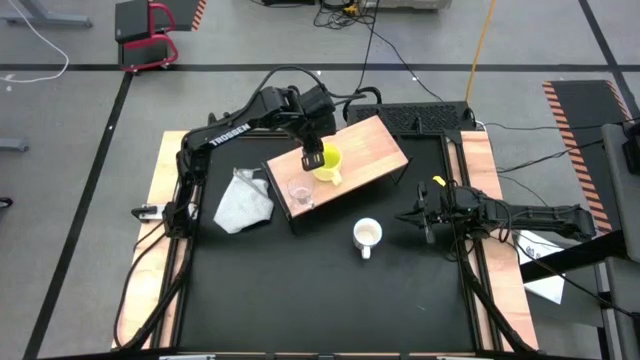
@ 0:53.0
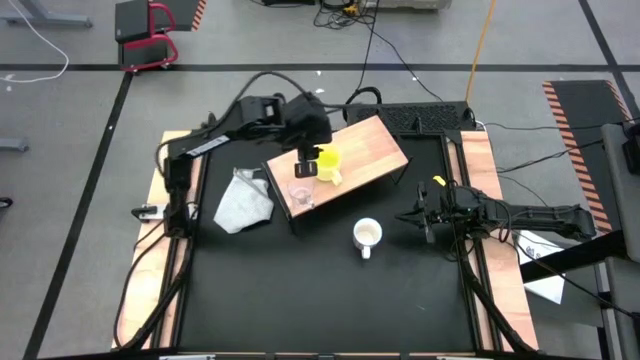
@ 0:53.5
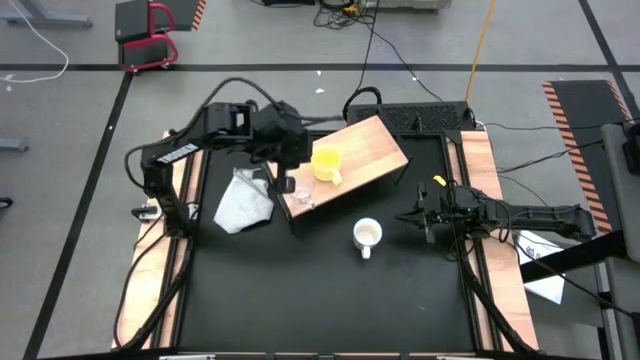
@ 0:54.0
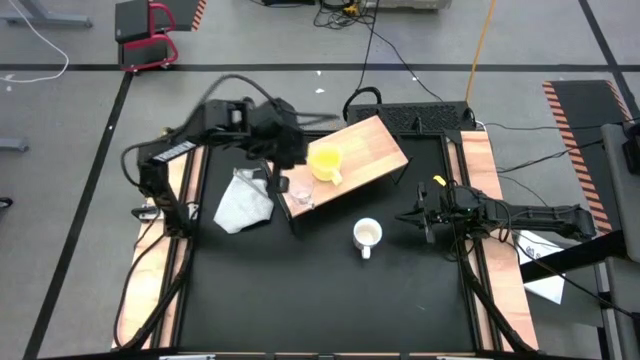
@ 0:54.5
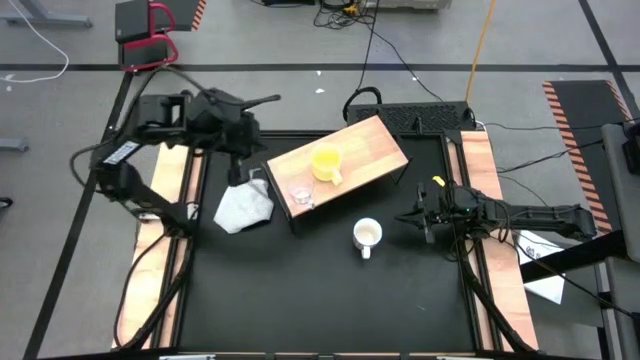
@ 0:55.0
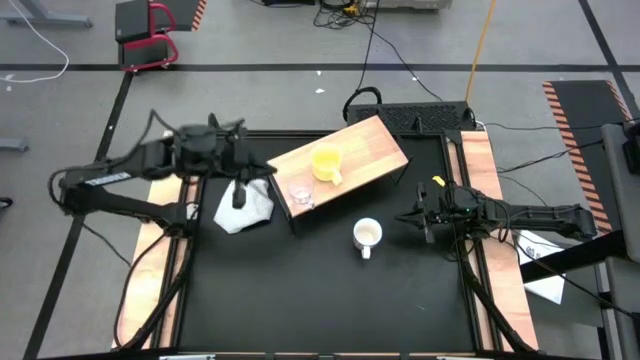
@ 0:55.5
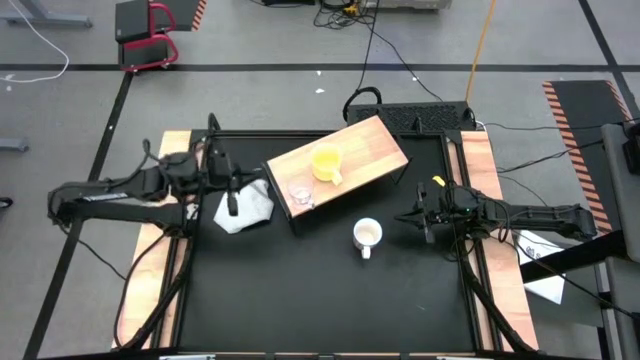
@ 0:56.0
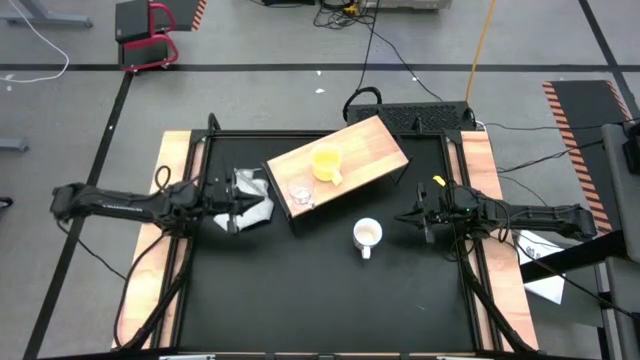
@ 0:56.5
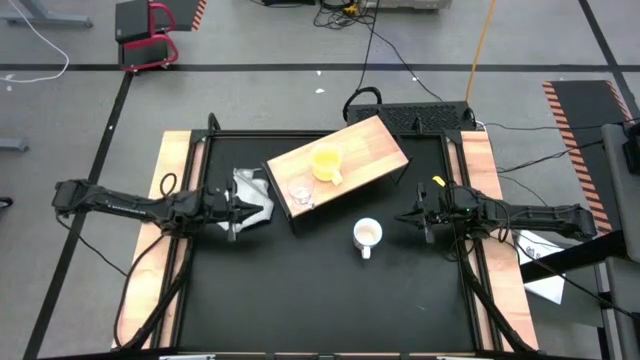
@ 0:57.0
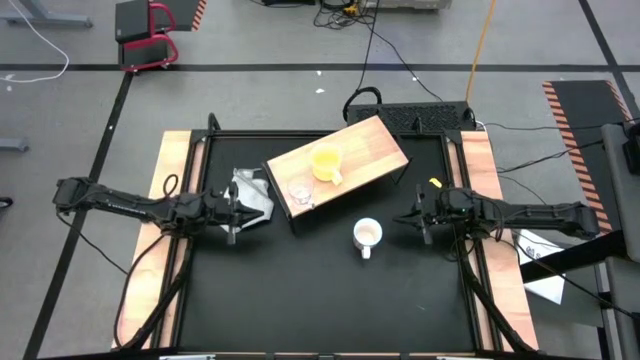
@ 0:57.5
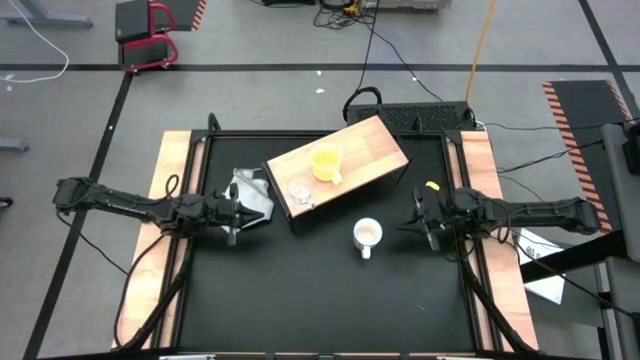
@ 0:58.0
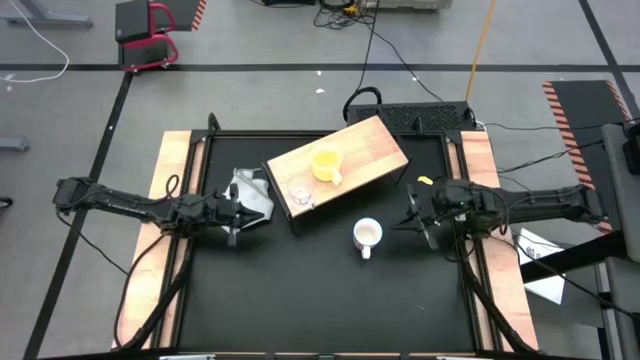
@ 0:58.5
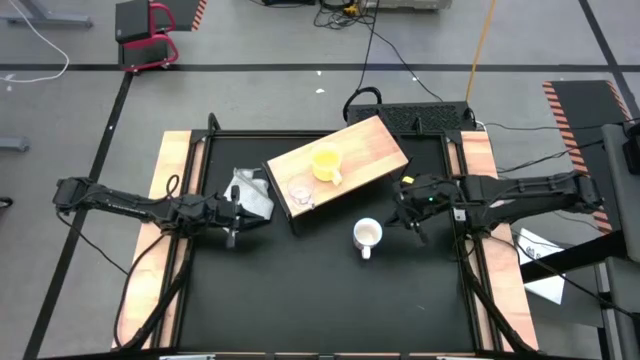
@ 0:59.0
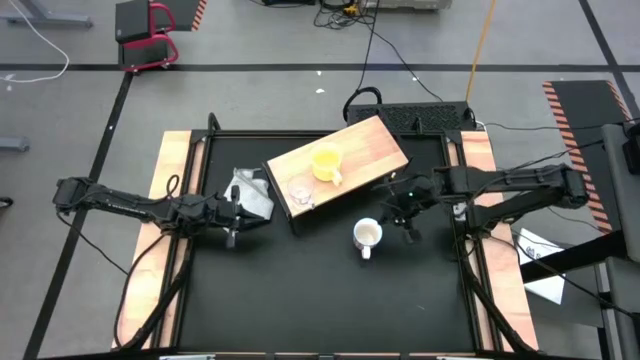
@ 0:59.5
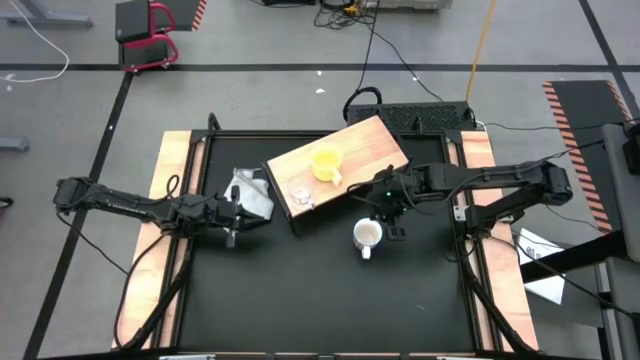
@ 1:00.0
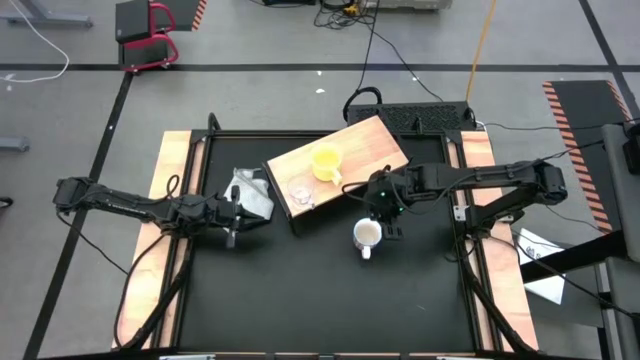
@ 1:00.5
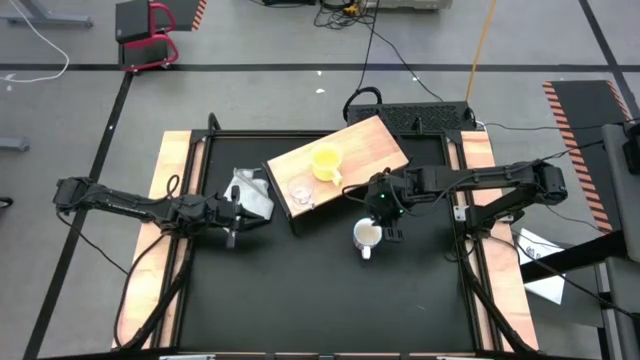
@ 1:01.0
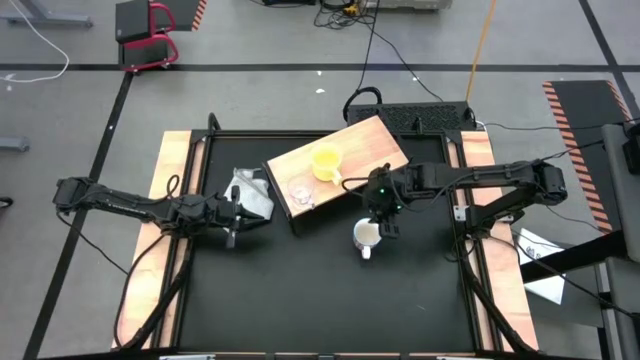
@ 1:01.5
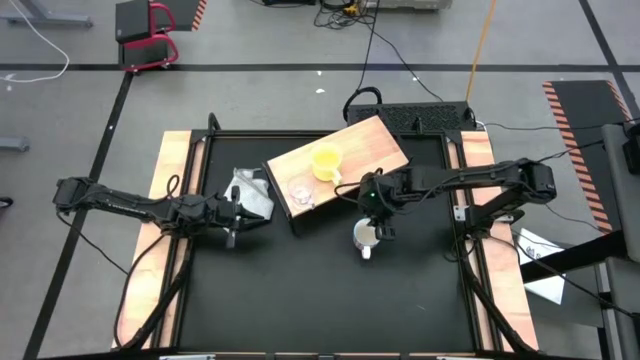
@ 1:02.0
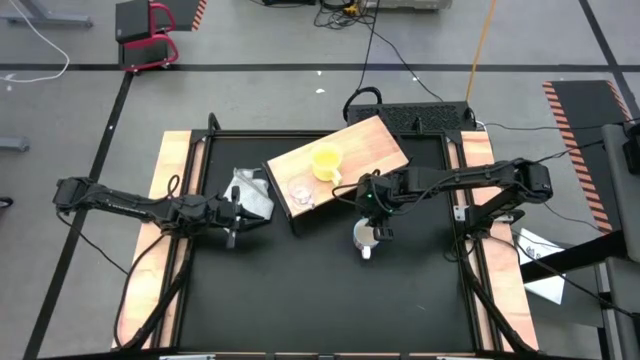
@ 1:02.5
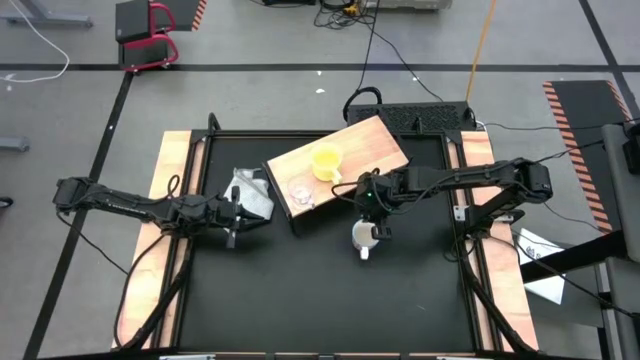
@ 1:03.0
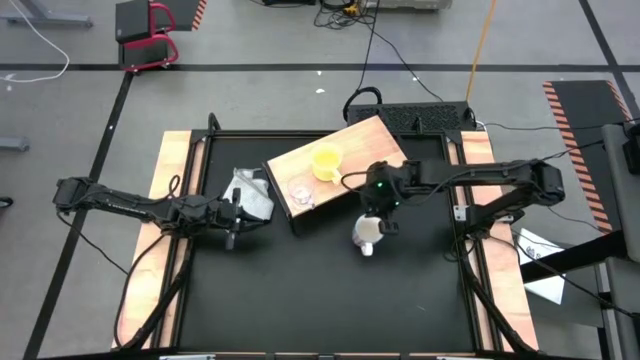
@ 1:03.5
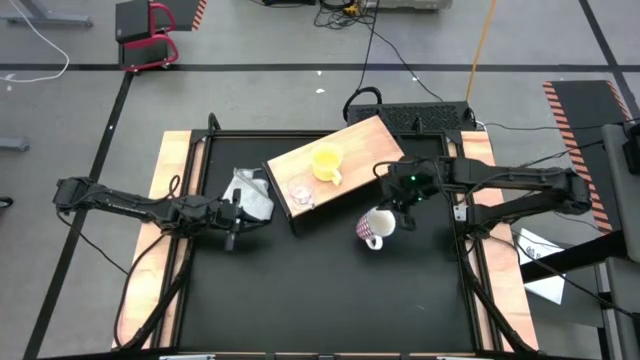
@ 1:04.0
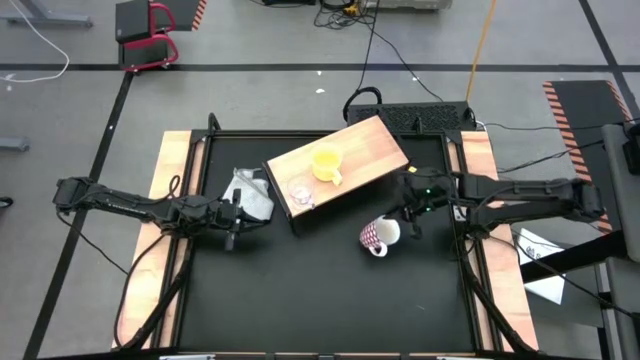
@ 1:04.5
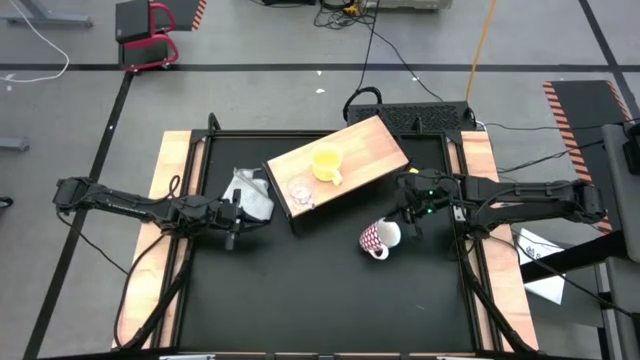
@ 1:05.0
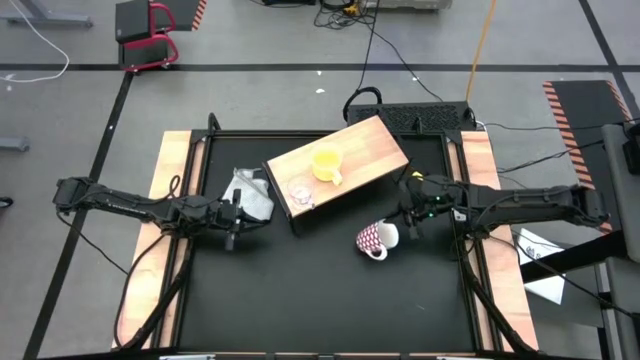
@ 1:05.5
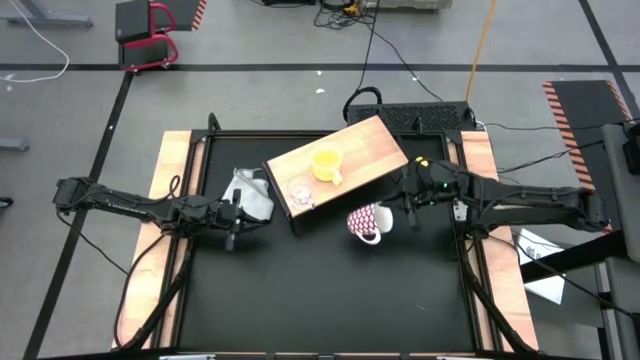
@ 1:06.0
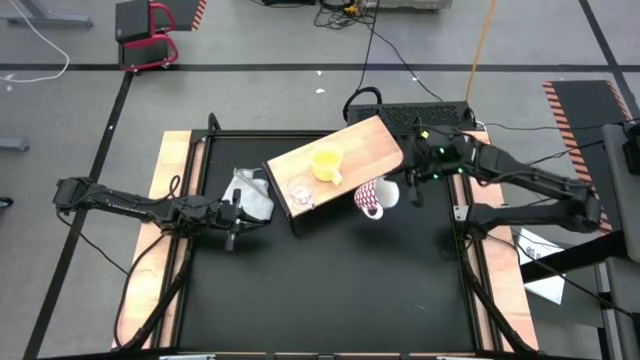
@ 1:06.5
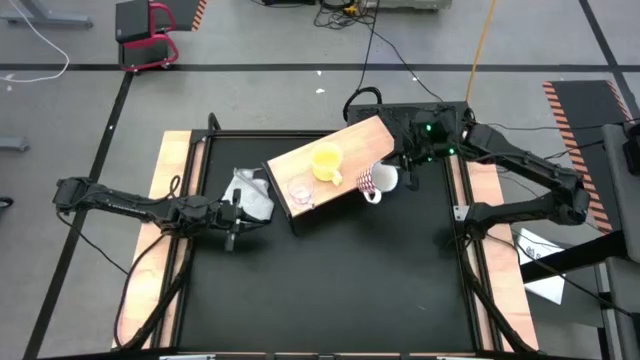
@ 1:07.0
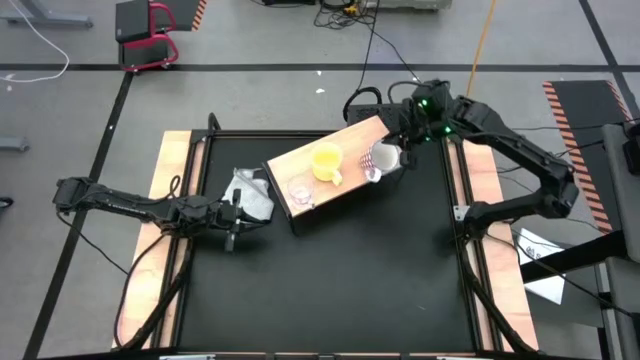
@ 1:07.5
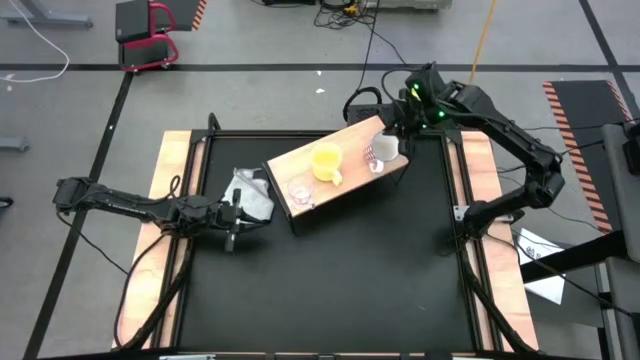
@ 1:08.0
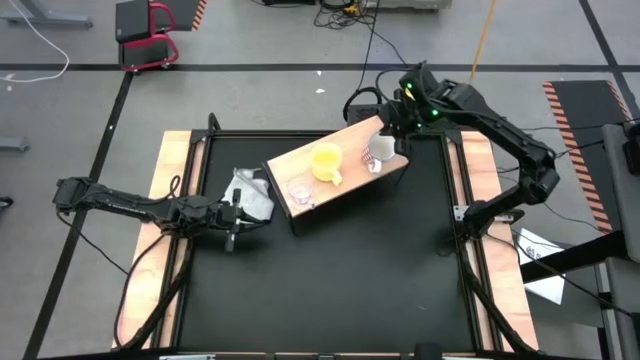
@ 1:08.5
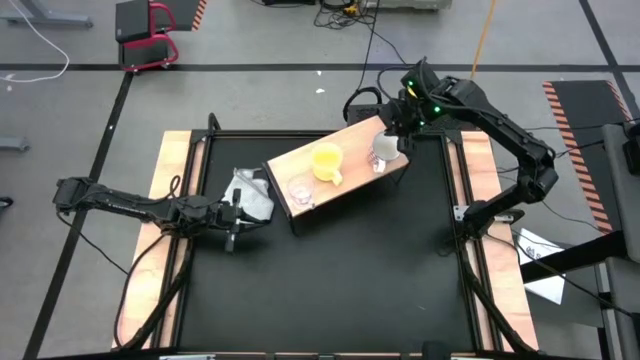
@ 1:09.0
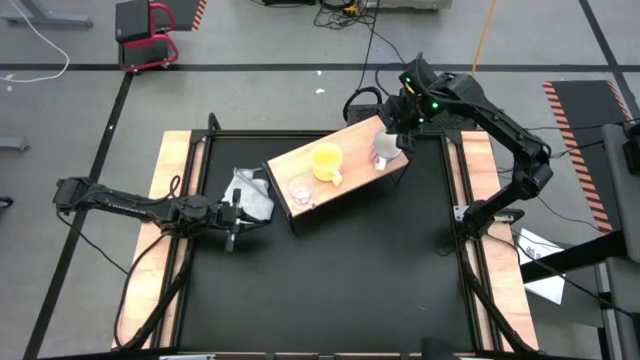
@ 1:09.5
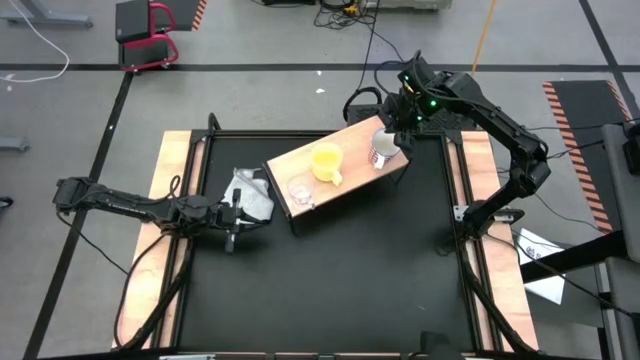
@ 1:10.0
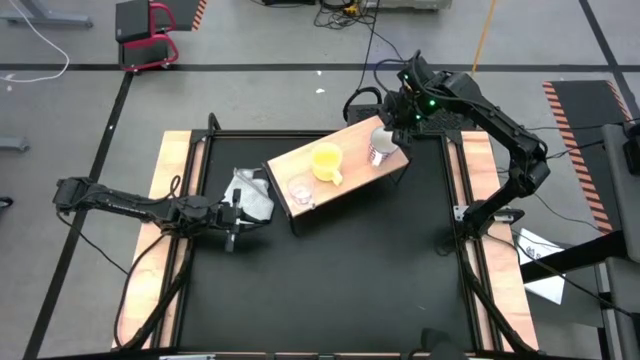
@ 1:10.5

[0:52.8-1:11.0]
Task: Stack small to large cups/mugs on shelf
Put the white and red mug on the shelf

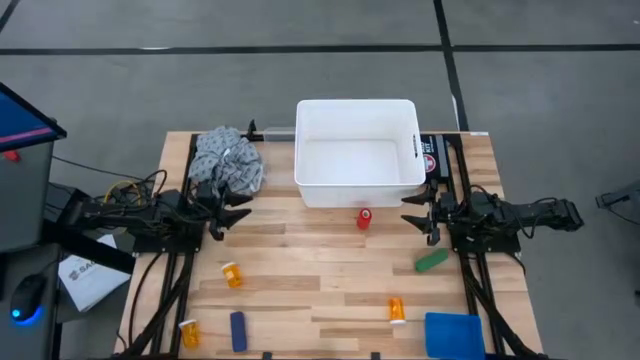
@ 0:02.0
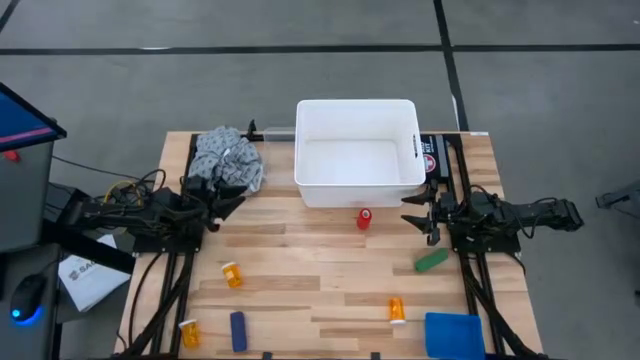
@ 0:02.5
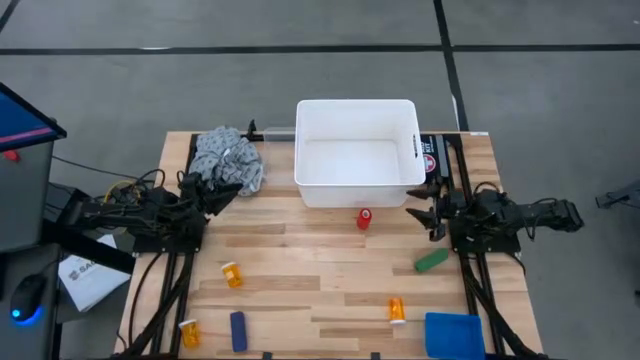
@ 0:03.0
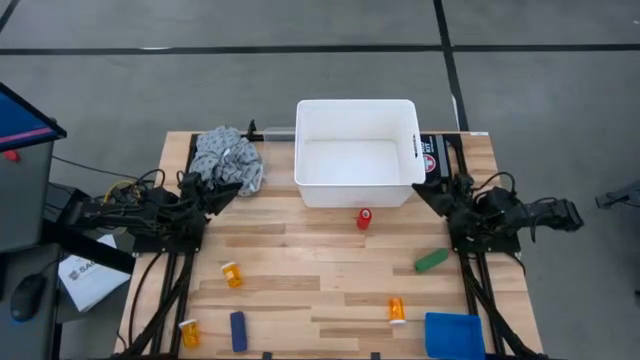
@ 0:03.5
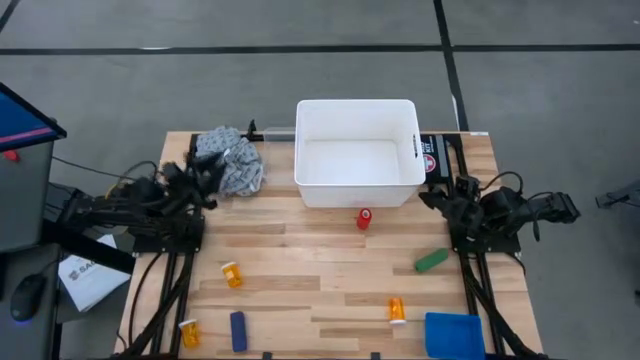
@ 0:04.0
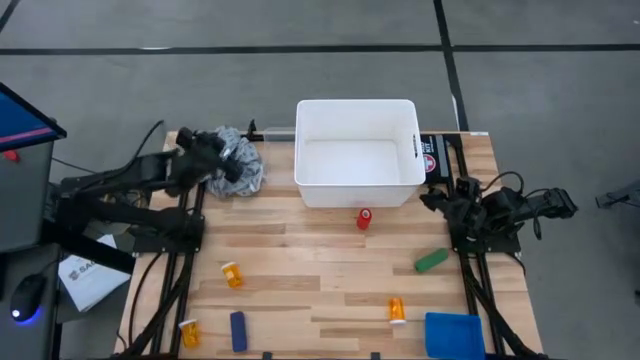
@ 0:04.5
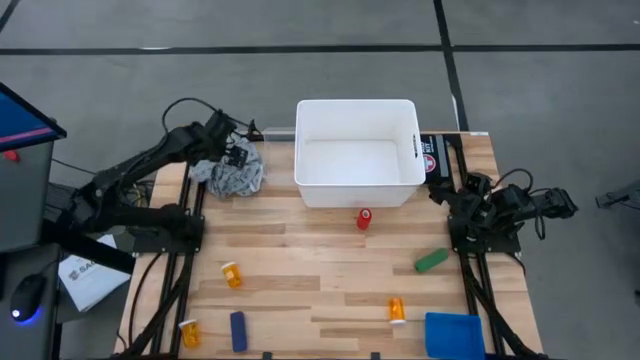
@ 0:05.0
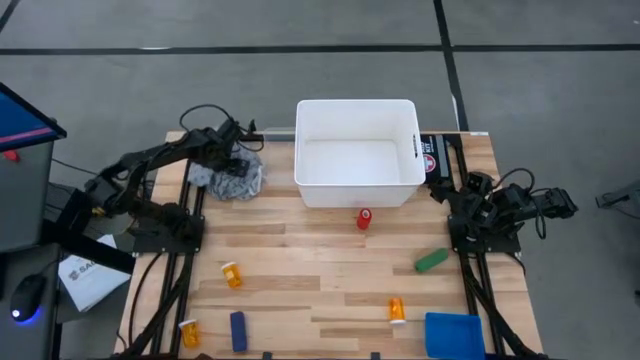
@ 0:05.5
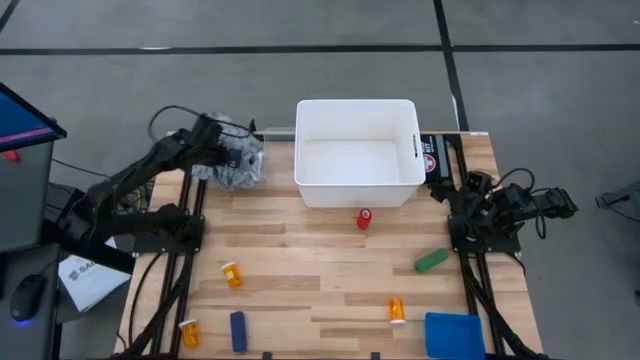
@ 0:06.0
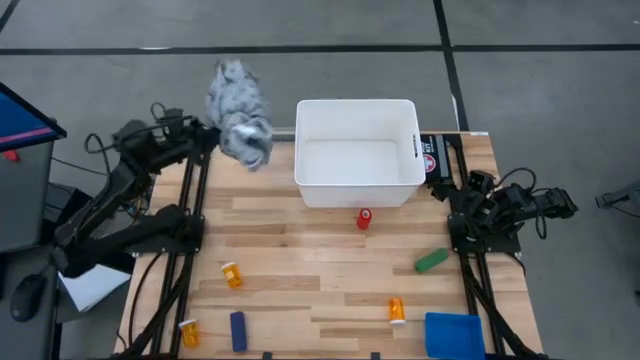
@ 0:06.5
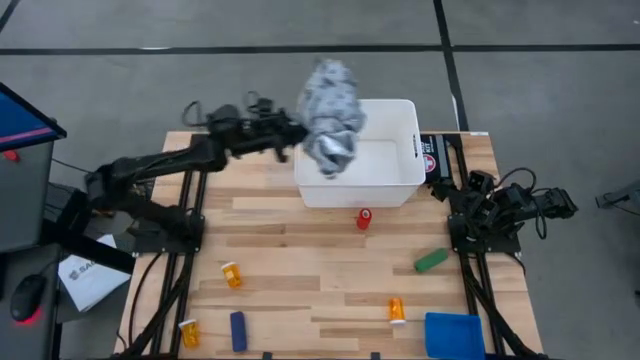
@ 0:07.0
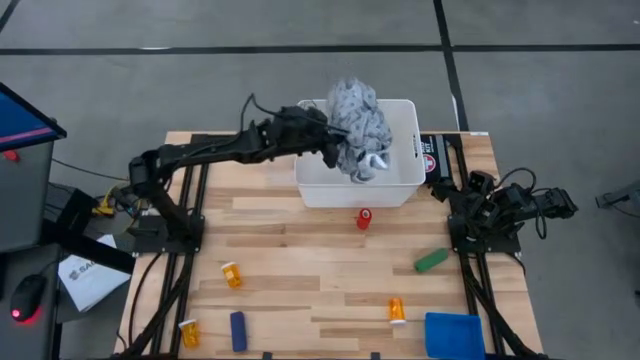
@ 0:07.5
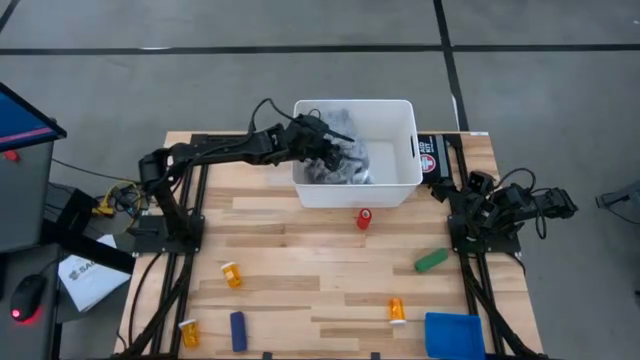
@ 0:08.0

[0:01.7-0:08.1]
Task: Pick & Place Medicine items
Put the gray patient gown into the white bin
